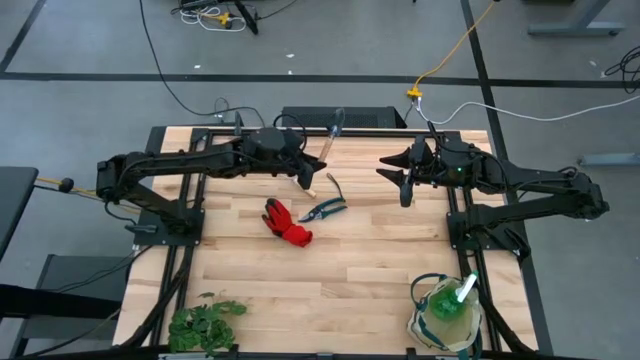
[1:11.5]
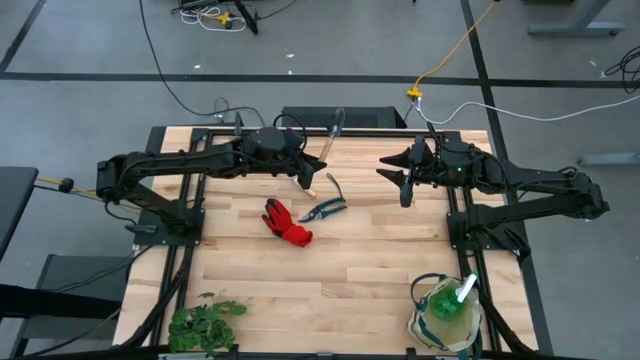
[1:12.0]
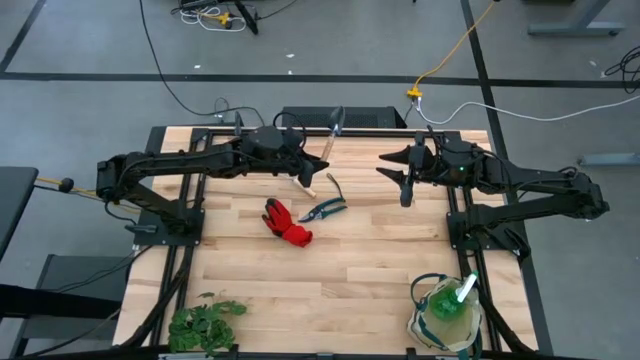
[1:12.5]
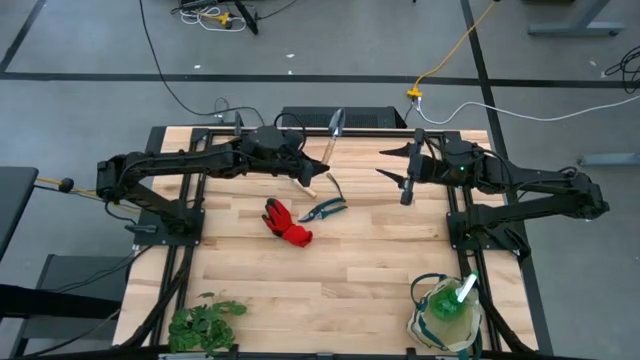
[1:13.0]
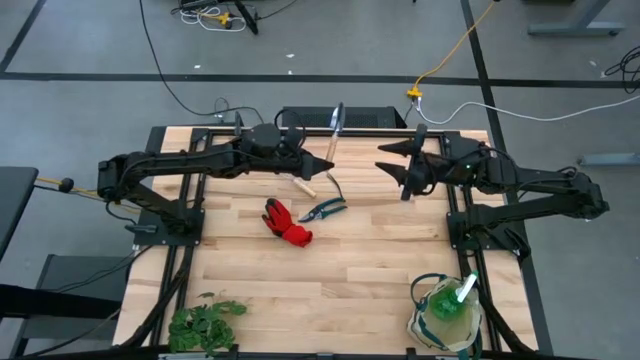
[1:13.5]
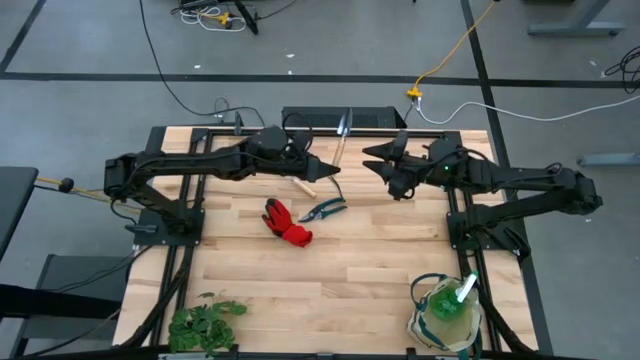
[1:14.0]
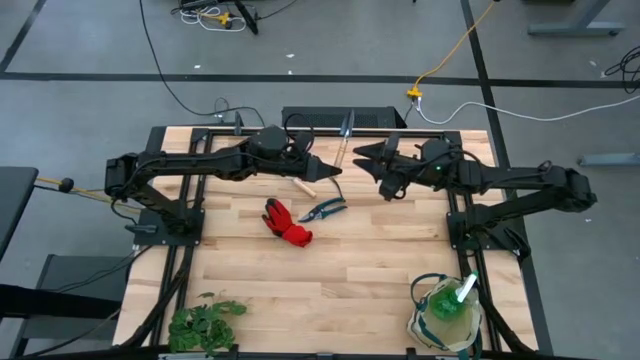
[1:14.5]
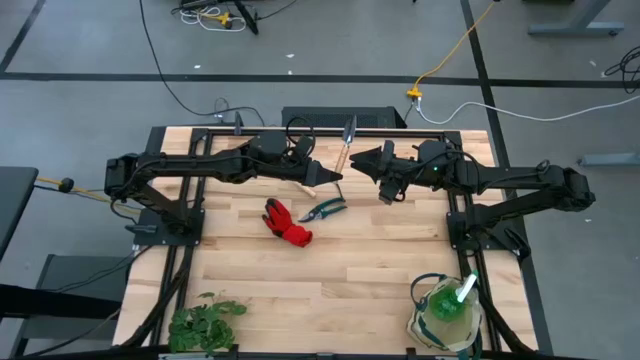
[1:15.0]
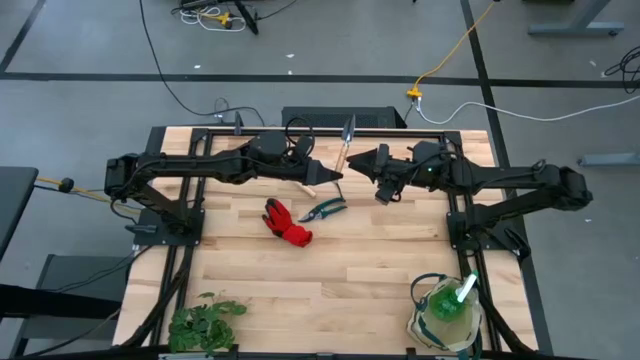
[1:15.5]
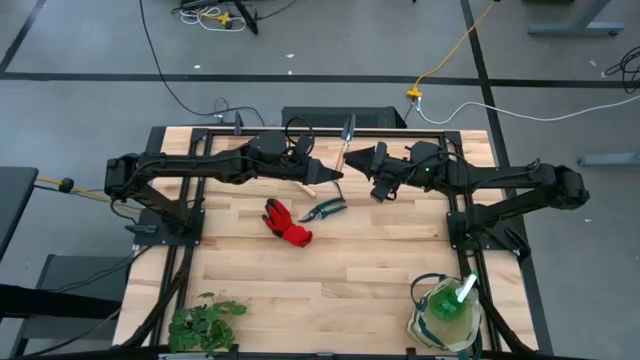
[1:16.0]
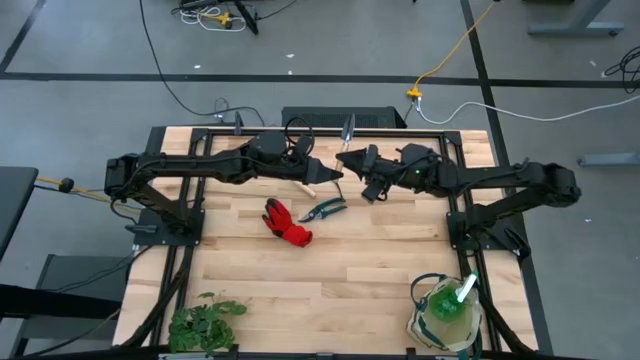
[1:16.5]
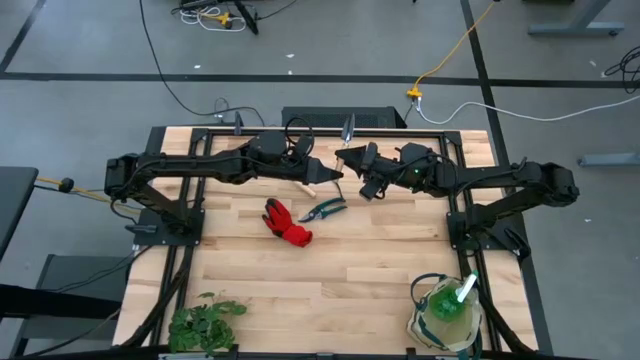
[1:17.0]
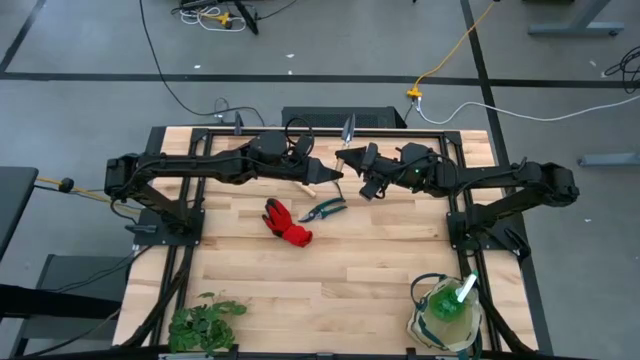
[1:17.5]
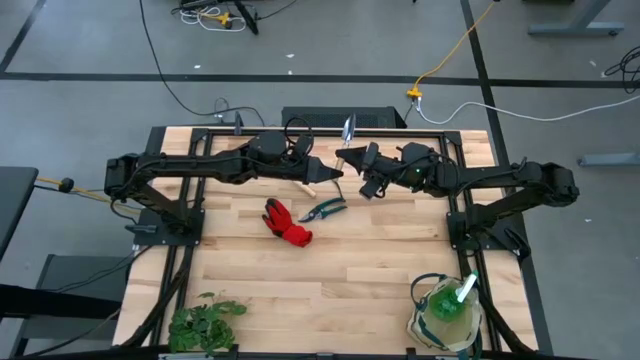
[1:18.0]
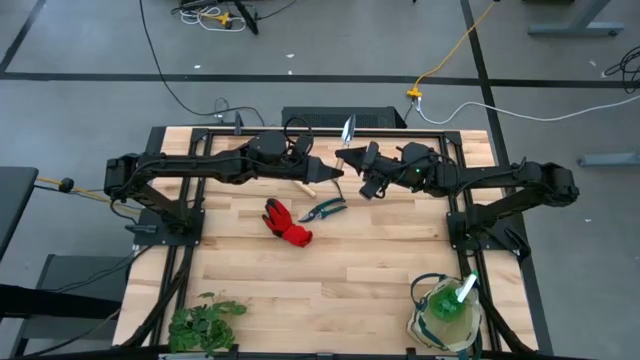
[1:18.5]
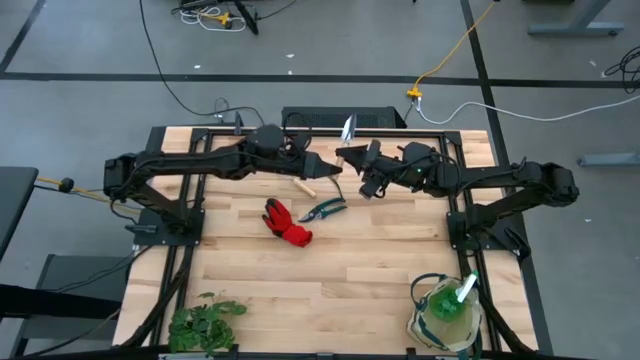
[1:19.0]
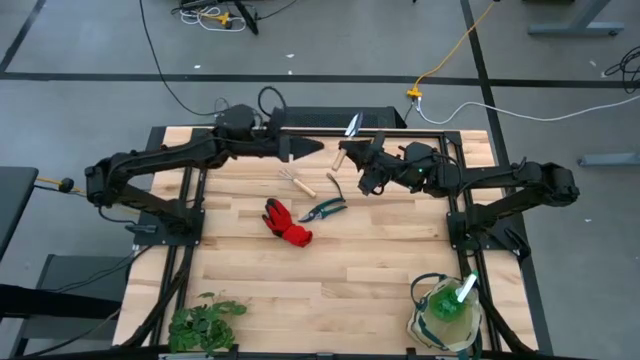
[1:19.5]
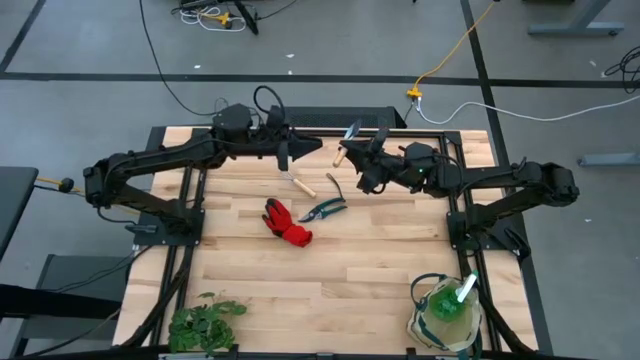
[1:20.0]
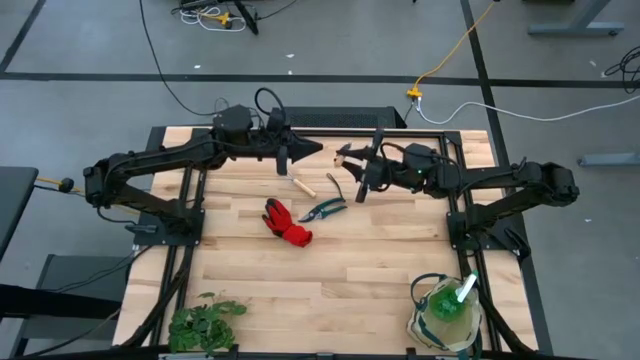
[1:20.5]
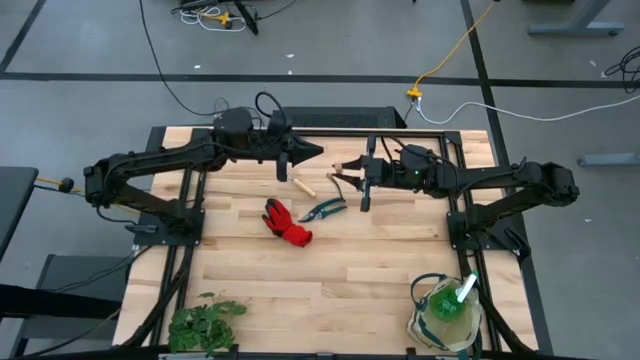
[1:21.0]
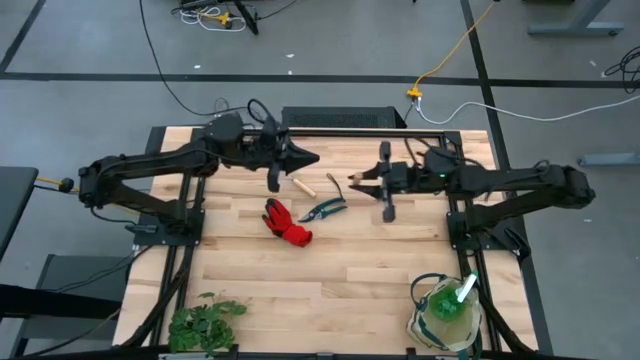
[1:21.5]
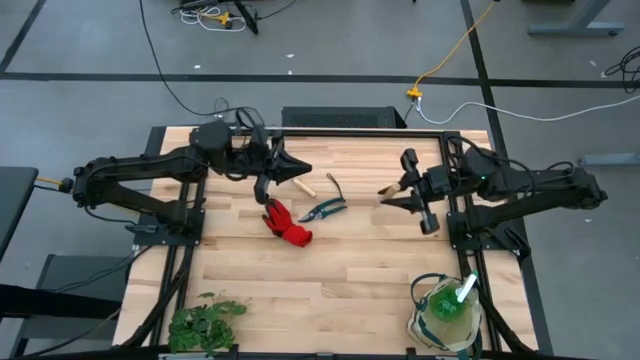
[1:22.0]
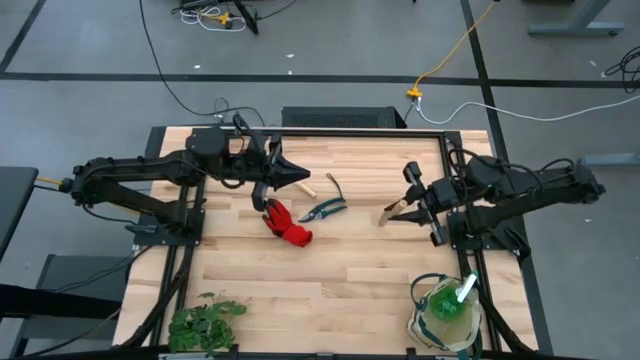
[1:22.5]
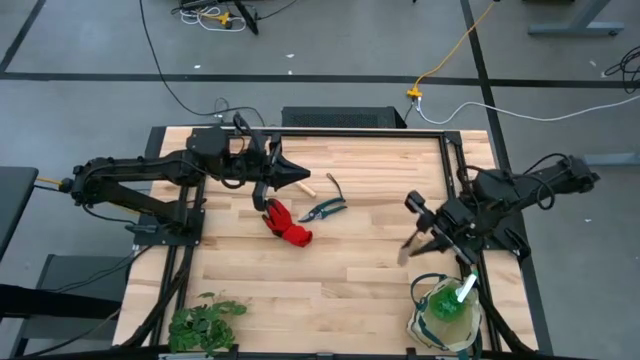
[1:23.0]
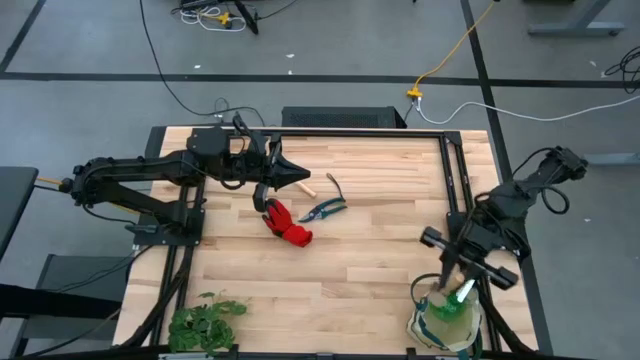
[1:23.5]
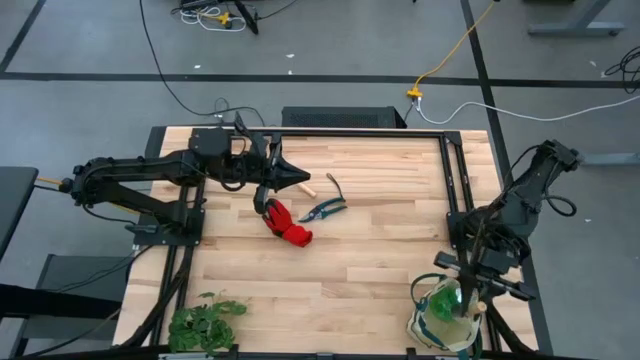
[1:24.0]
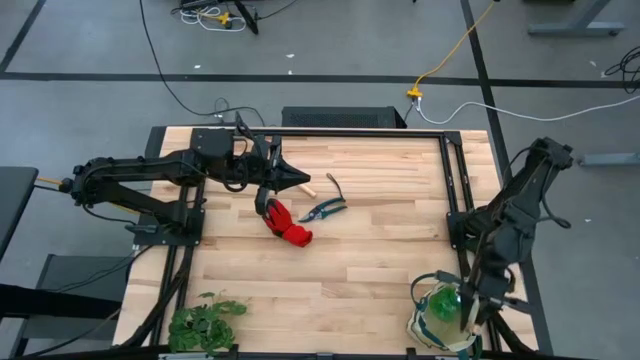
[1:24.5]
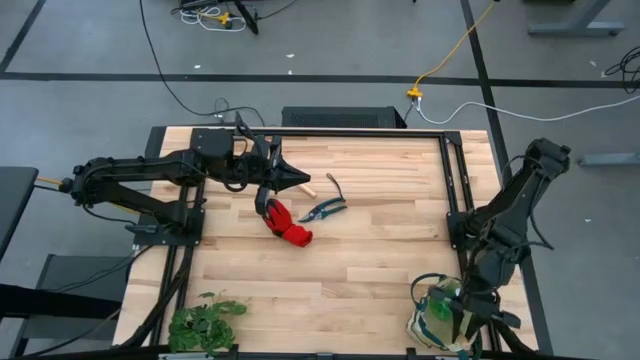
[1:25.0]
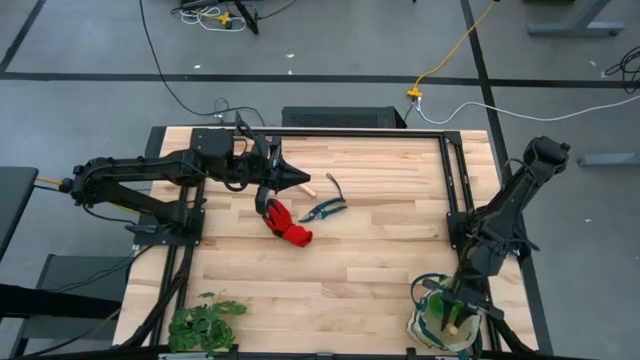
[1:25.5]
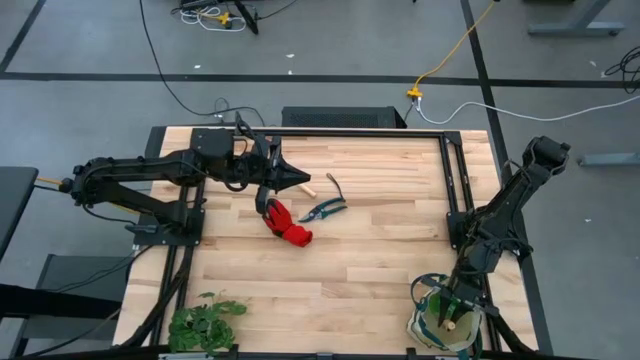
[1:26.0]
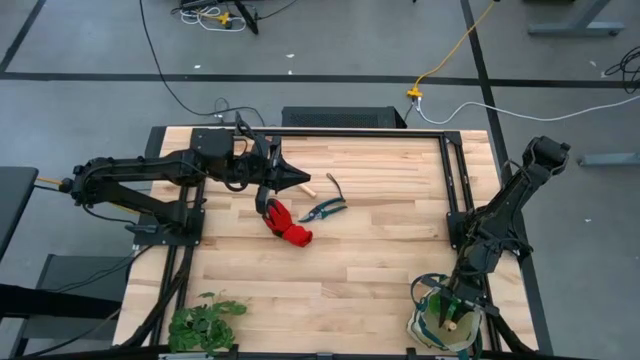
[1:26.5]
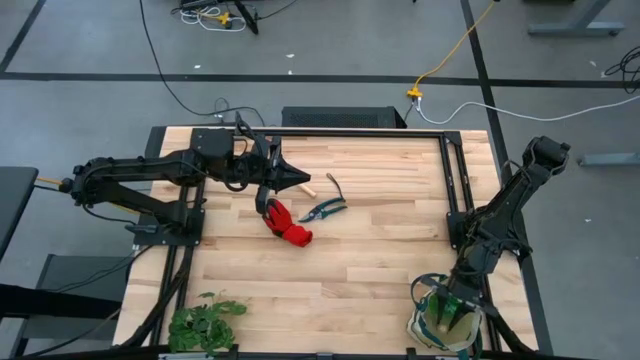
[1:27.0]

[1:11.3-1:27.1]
Task: Pick & Place Garden tools in Gardening bag
Put the trowel into the gardening bag

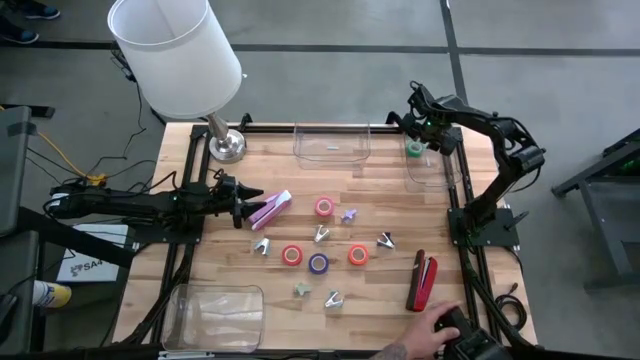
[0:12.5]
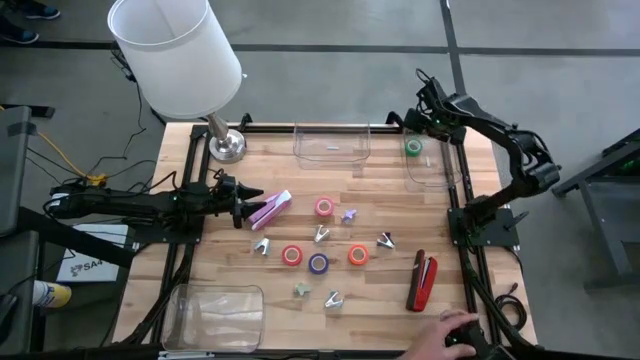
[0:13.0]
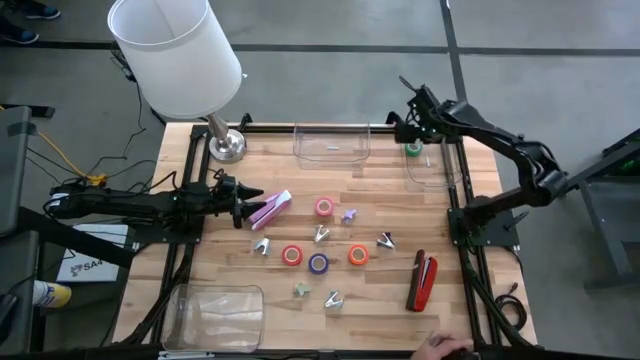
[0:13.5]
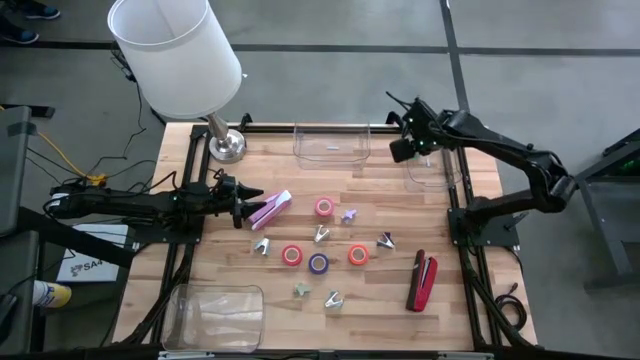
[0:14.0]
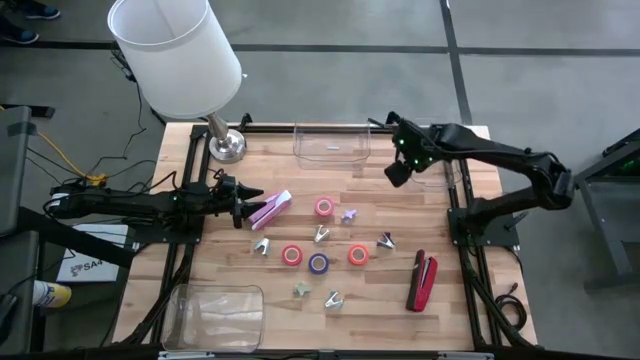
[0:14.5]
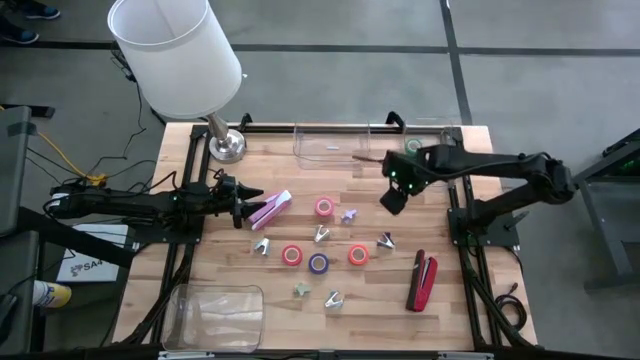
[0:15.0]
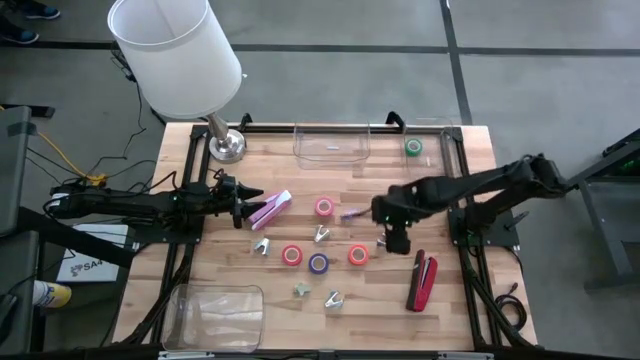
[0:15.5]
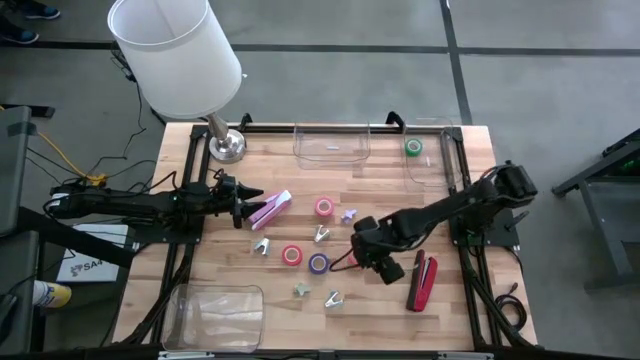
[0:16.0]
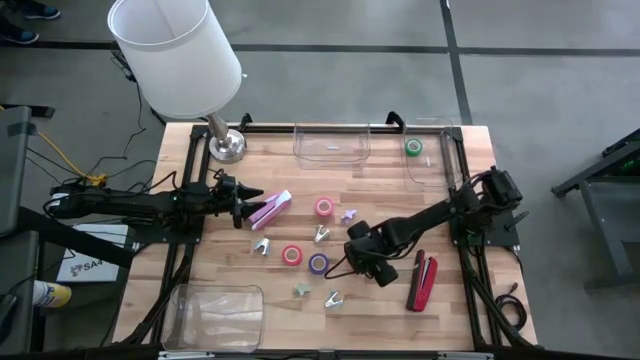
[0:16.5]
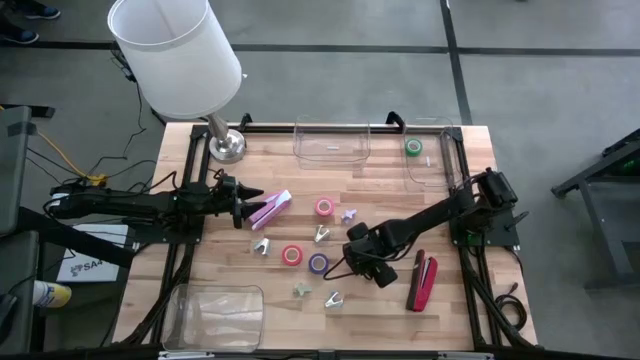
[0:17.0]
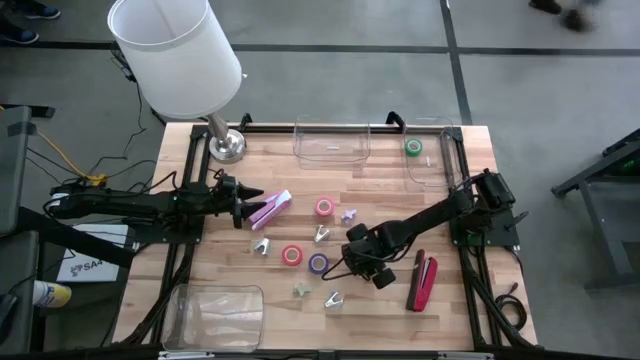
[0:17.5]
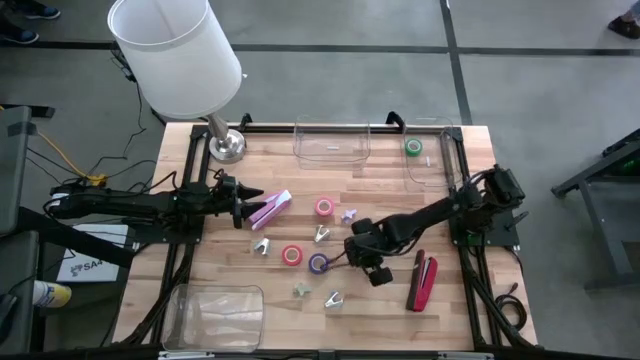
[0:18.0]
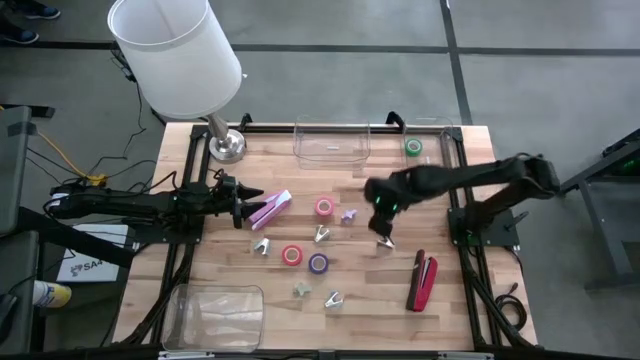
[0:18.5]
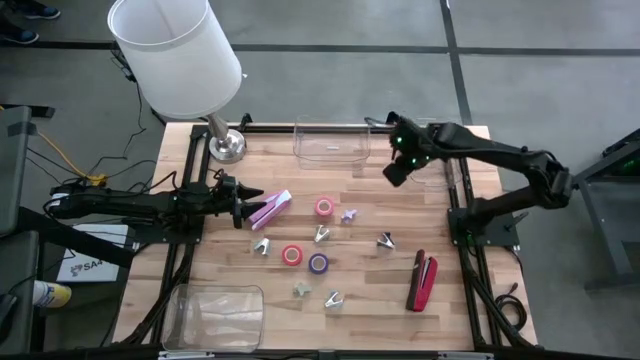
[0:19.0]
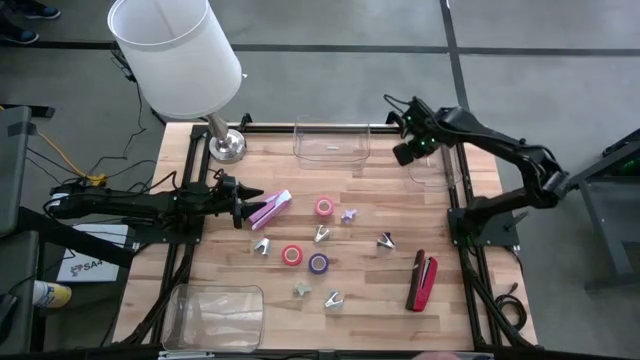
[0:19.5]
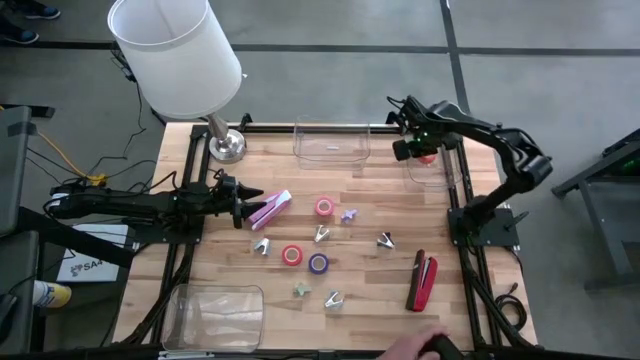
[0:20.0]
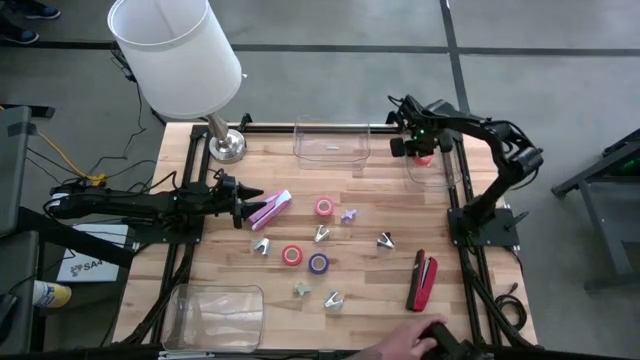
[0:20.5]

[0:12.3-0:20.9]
Task: Pick and place Stapler, Stapler remover, tape
Put the orange tape into the top right transparent bin
